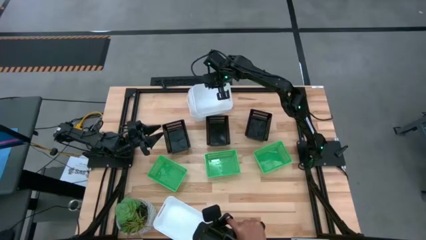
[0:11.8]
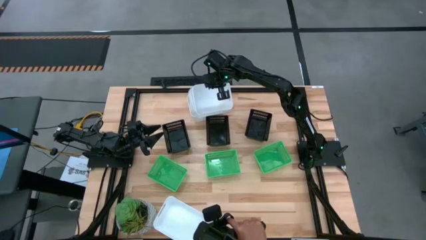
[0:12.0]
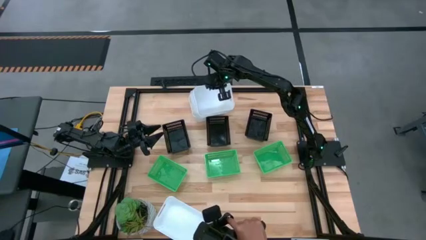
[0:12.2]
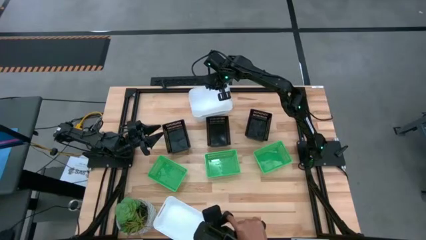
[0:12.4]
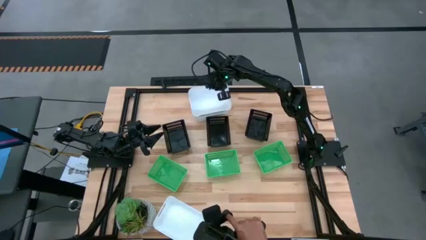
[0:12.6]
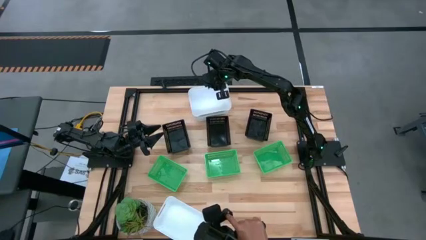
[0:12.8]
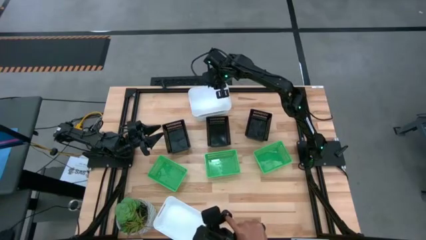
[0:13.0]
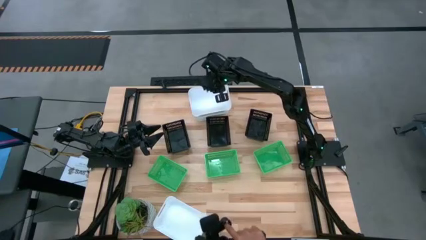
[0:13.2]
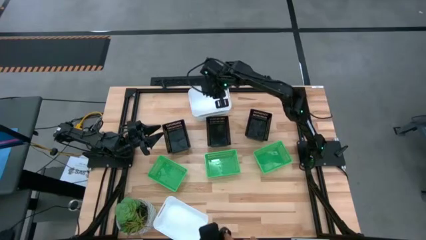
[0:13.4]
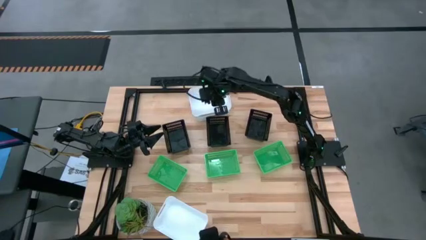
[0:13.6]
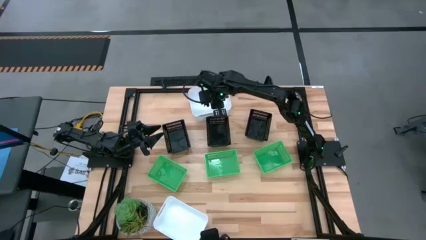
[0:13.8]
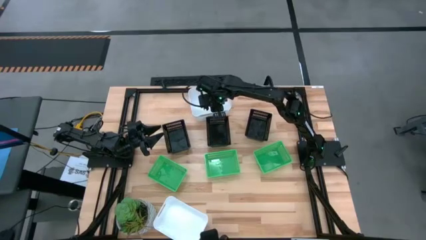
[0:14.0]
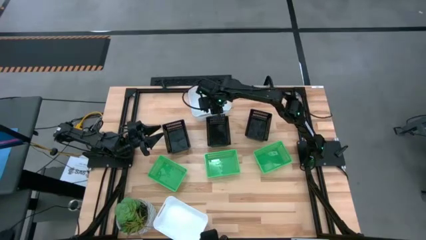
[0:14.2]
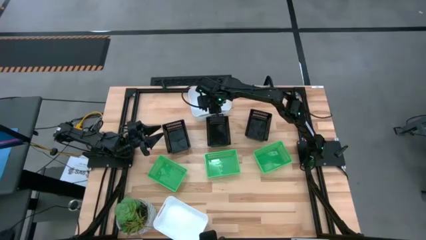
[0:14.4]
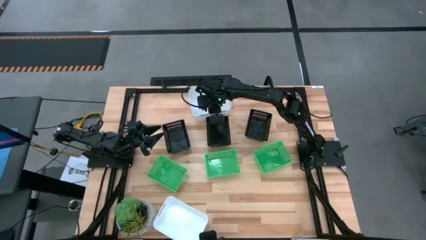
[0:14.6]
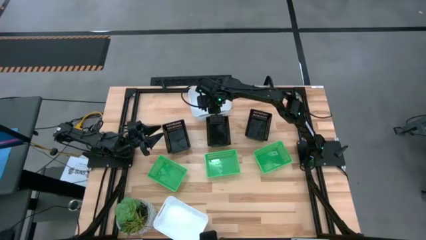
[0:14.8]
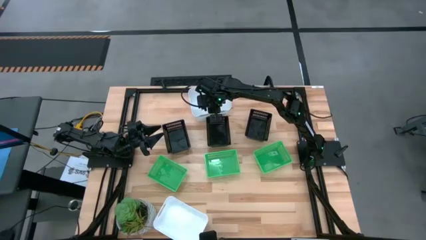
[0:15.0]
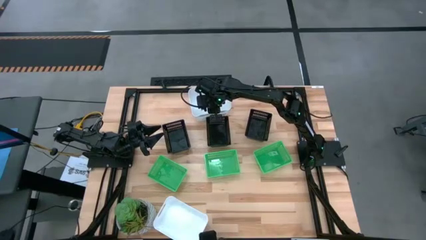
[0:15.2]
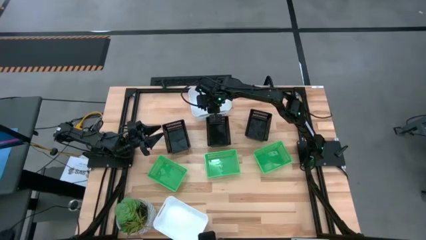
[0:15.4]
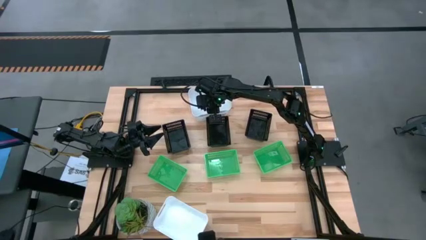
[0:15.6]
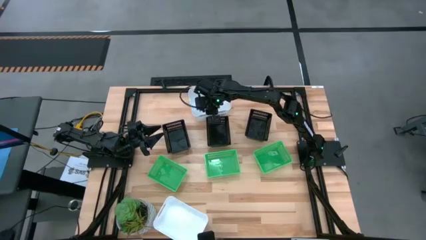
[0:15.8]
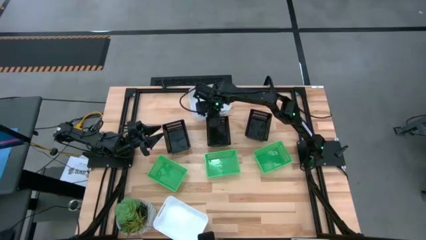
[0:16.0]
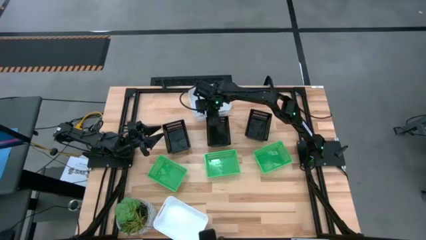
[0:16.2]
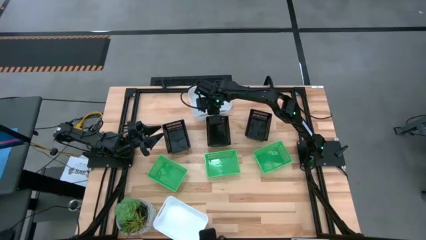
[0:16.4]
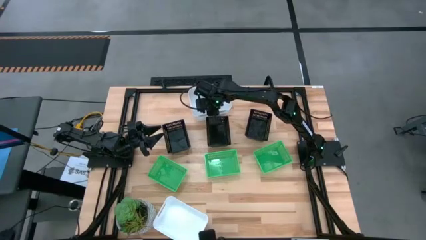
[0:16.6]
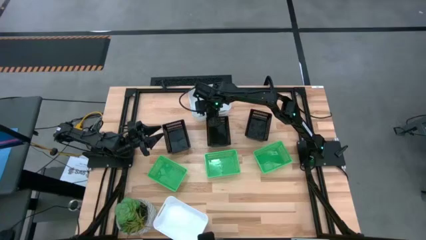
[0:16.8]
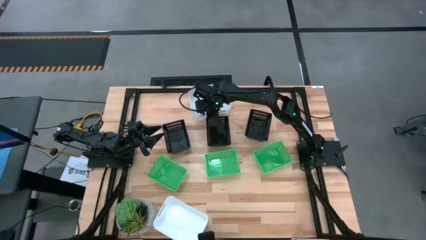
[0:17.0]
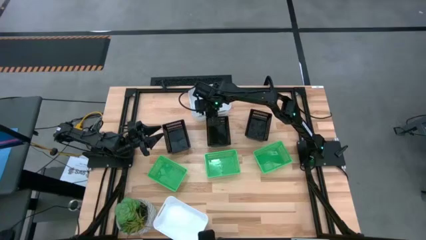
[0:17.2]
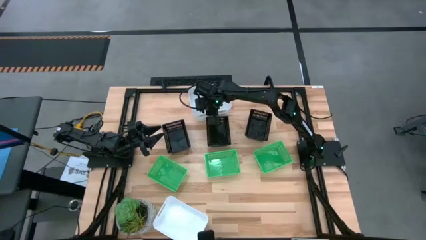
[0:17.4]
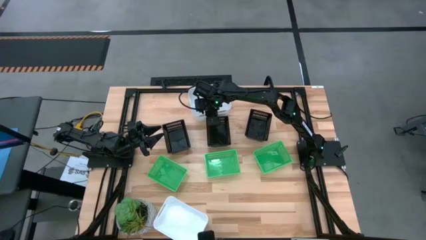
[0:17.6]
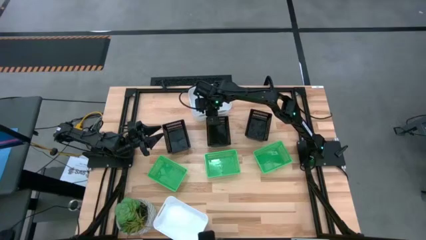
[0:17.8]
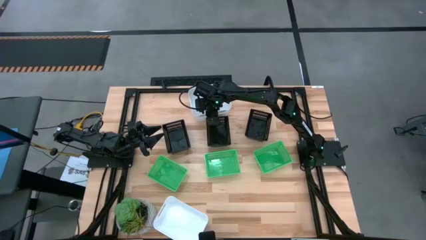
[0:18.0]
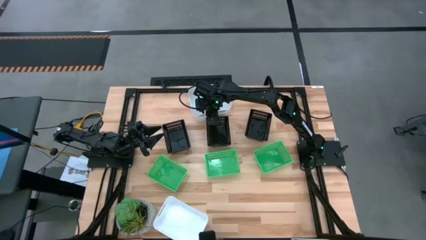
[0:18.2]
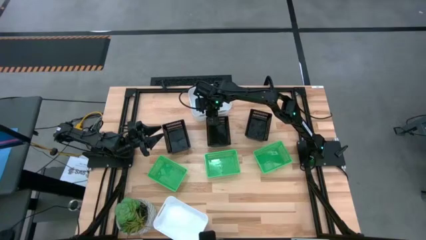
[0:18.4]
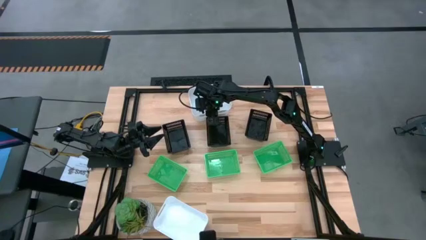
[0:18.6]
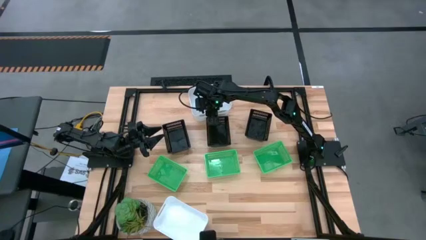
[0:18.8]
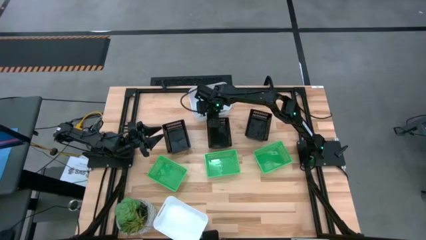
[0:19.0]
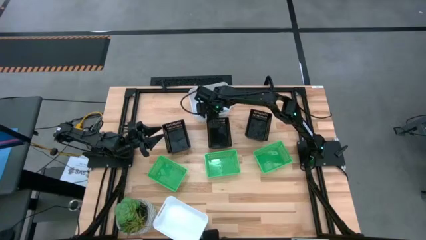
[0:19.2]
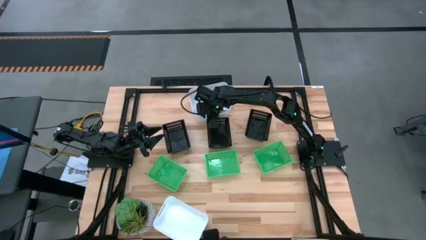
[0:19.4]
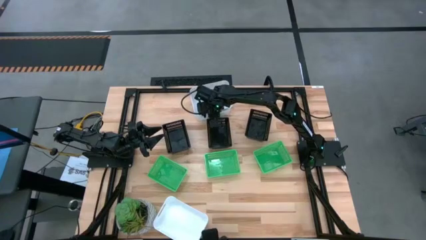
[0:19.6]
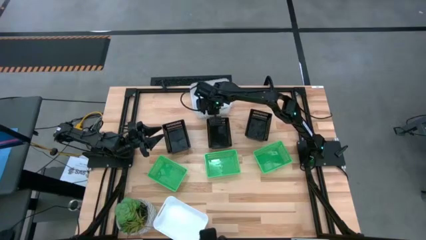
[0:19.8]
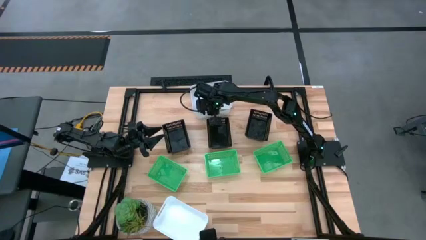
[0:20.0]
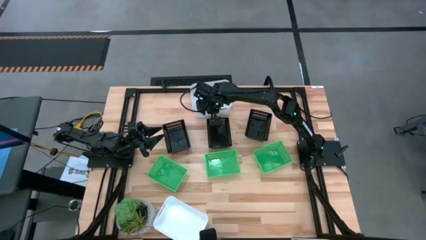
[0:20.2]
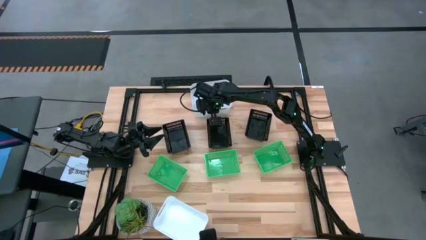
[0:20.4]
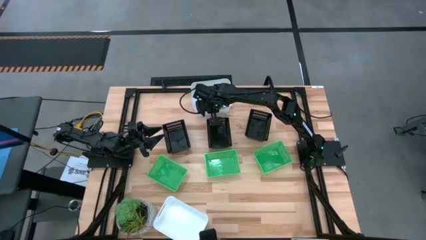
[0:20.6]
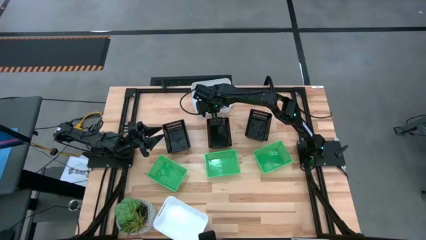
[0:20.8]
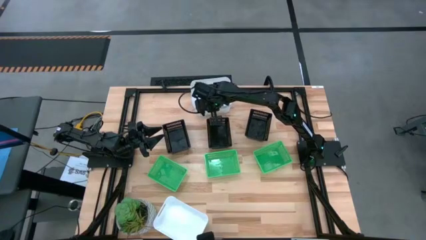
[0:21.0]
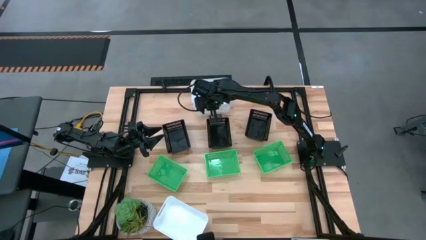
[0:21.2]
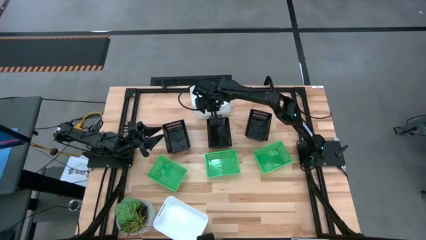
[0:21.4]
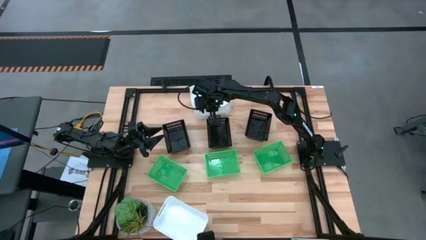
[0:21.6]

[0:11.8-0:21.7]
Stack the bottom right white bin on the top white bin

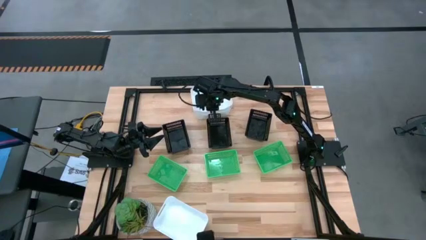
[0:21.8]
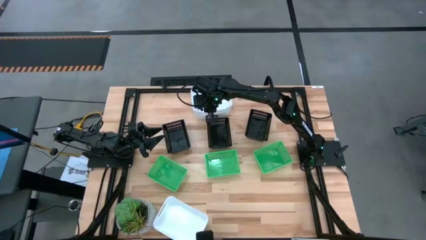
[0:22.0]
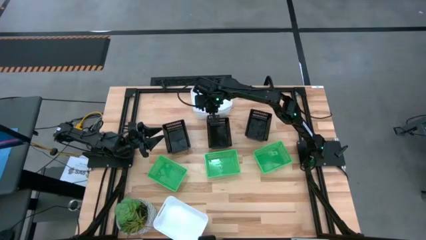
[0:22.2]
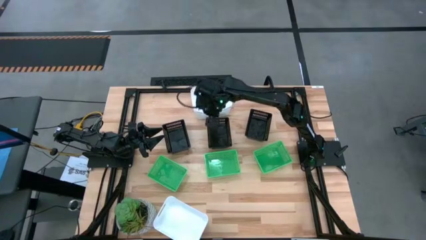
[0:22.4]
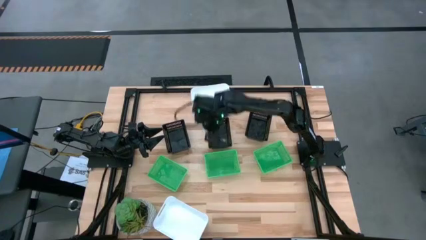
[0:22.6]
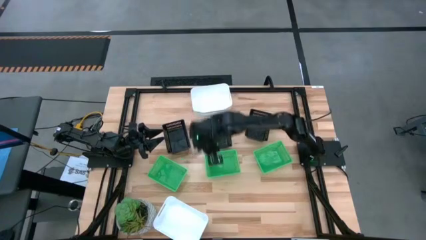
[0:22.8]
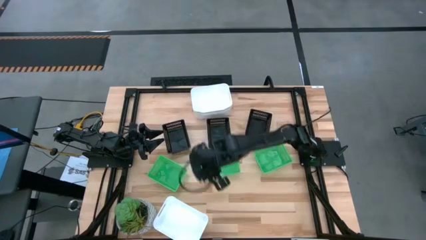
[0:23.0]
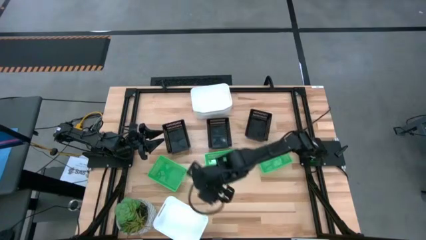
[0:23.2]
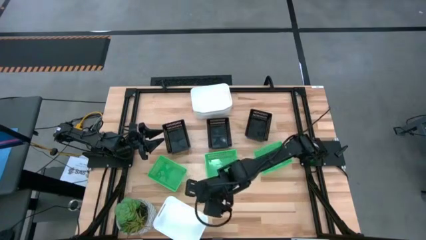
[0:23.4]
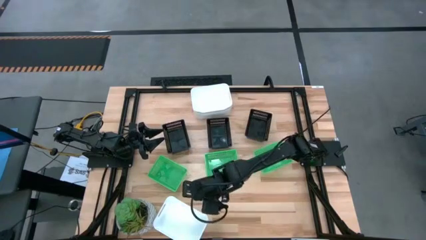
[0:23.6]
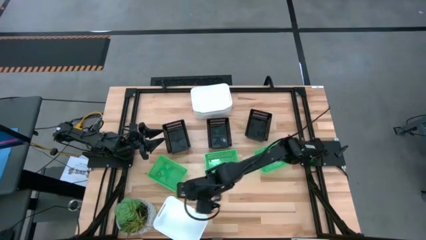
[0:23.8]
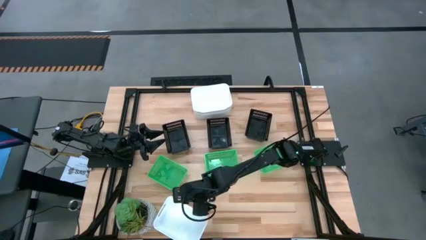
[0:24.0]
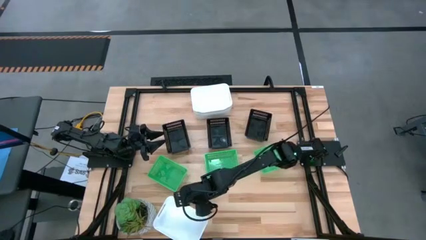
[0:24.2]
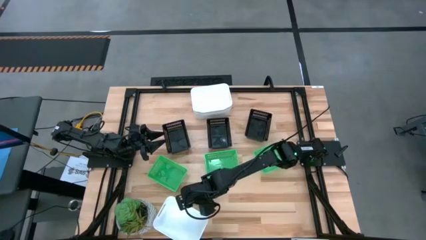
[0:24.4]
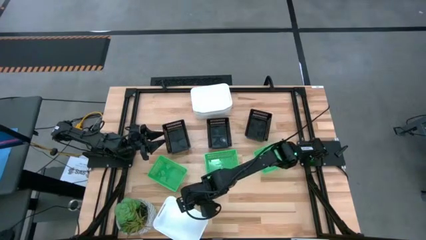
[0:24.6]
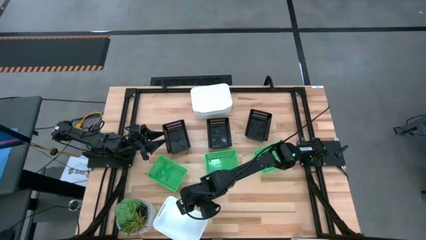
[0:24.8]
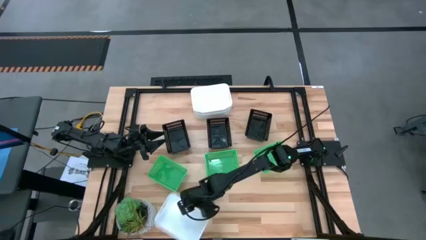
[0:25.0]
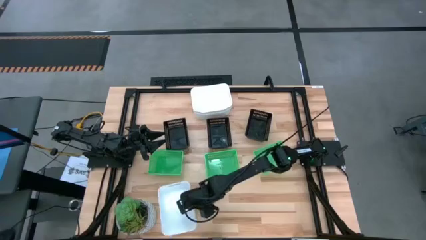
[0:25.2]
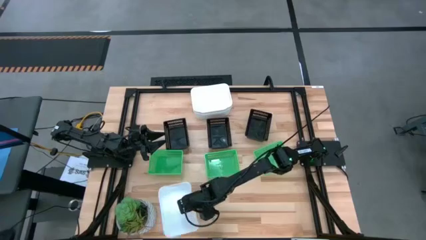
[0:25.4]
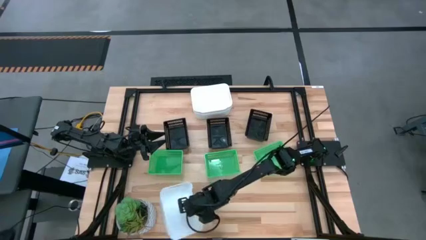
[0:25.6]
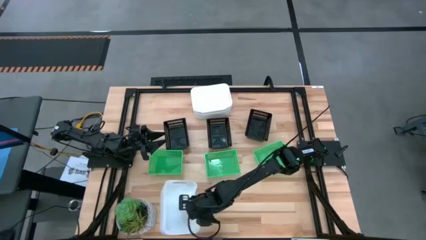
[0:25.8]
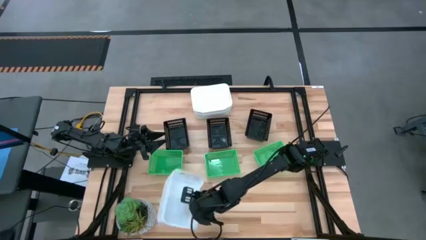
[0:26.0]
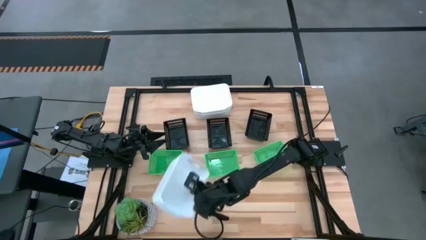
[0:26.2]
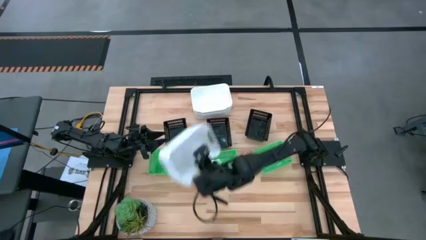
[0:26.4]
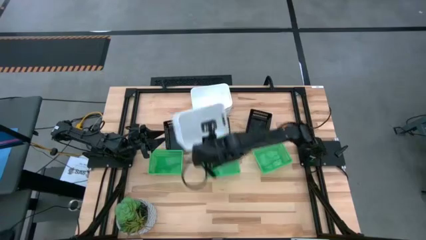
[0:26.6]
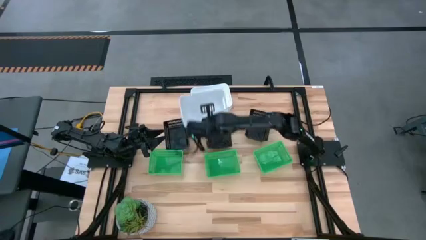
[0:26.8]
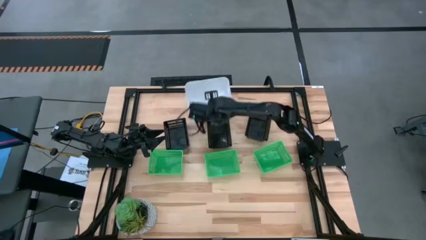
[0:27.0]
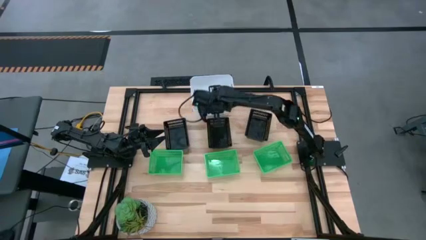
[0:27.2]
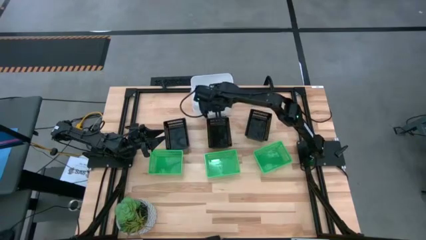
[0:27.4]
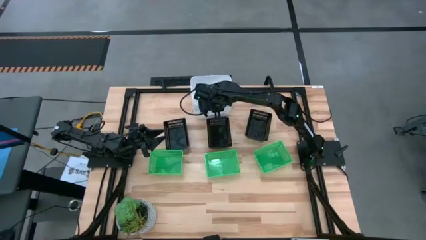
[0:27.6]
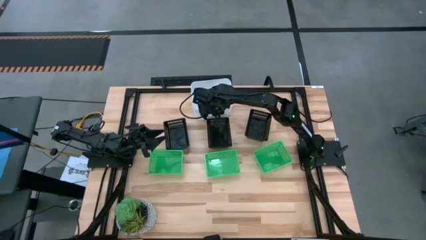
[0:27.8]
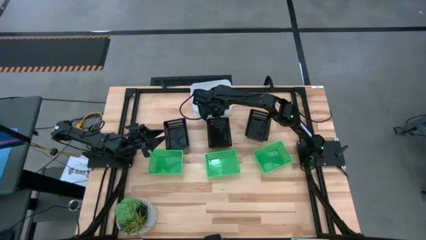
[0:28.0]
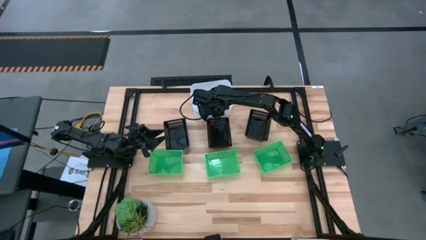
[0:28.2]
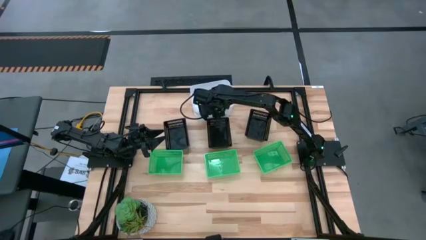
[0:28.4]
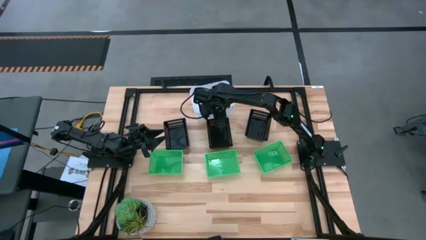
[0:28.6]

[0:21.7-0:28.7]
Stack the bottom white bin on the top white bin
